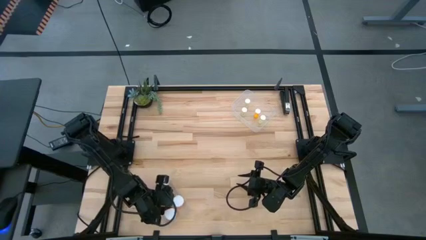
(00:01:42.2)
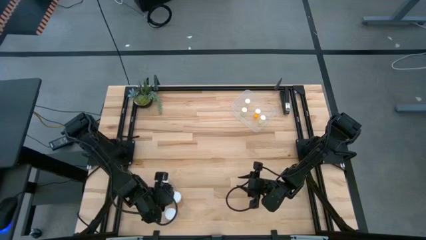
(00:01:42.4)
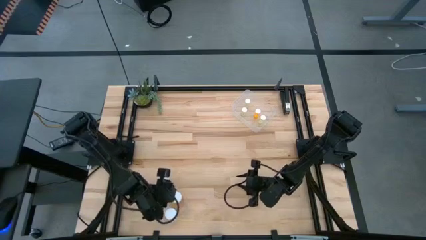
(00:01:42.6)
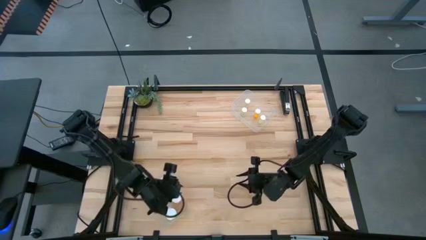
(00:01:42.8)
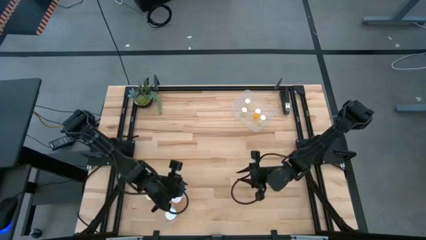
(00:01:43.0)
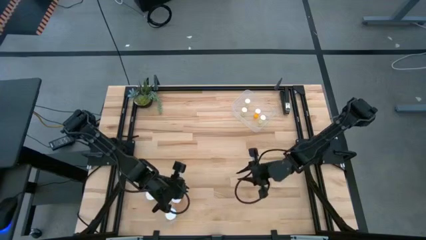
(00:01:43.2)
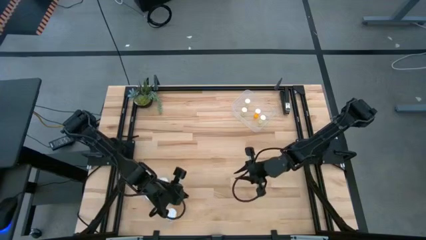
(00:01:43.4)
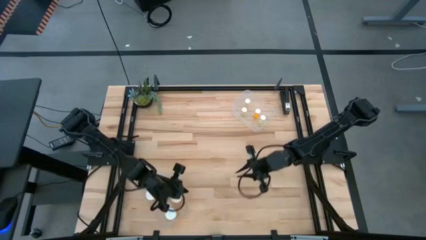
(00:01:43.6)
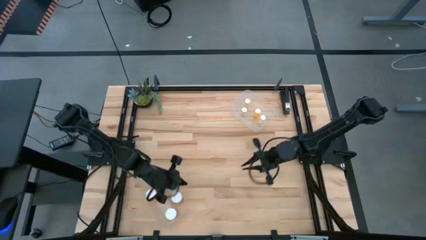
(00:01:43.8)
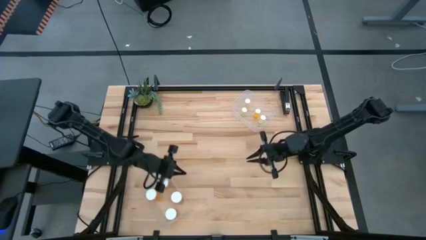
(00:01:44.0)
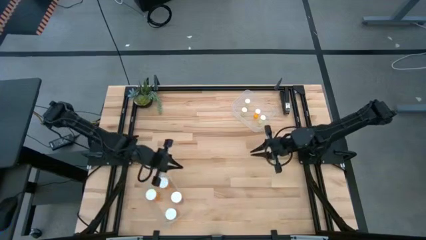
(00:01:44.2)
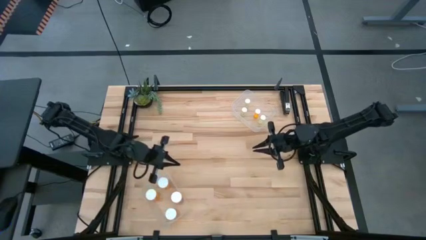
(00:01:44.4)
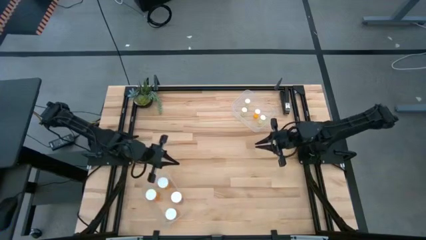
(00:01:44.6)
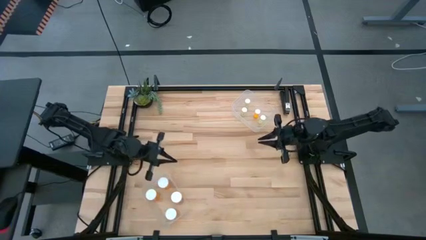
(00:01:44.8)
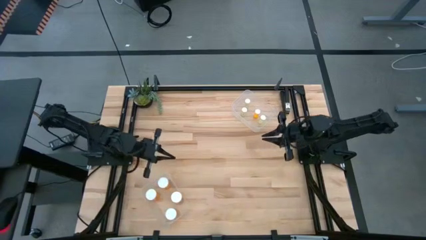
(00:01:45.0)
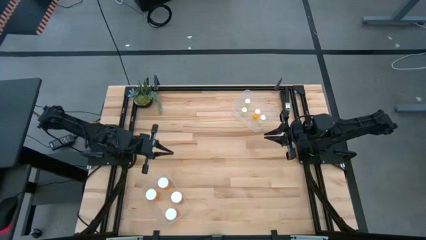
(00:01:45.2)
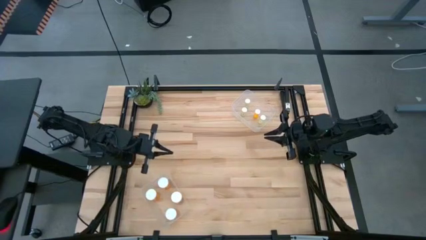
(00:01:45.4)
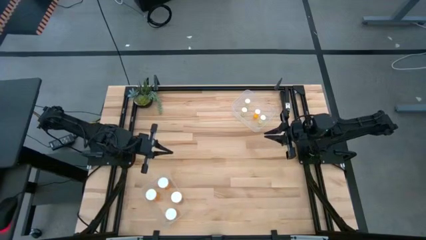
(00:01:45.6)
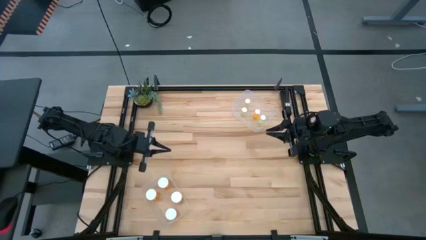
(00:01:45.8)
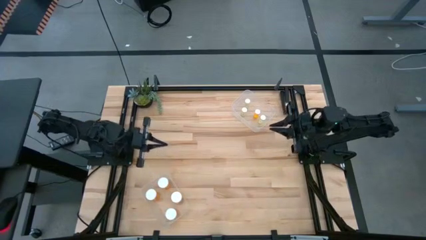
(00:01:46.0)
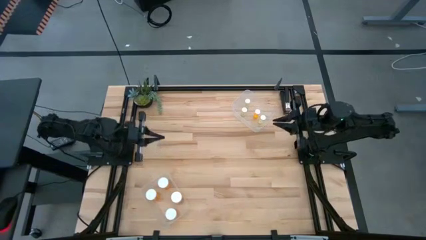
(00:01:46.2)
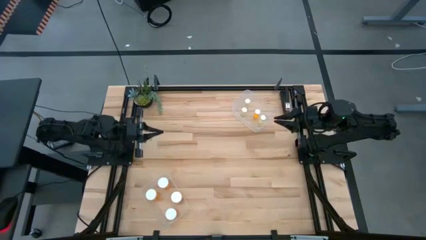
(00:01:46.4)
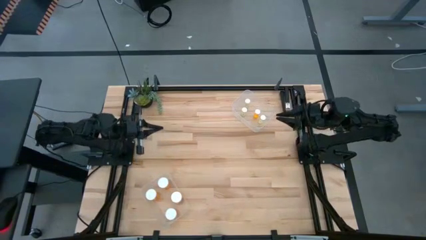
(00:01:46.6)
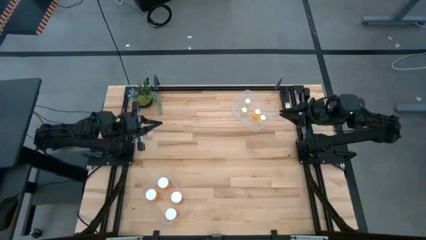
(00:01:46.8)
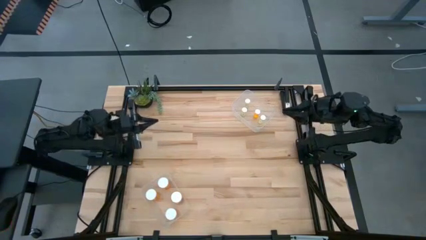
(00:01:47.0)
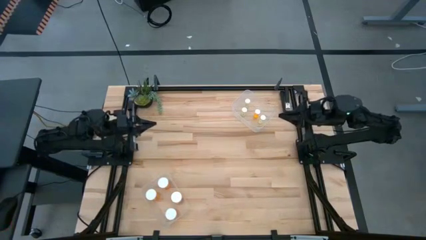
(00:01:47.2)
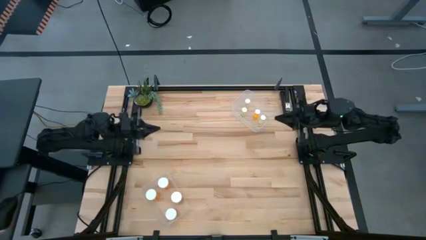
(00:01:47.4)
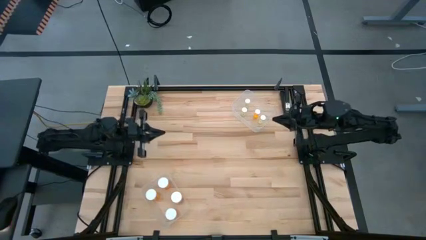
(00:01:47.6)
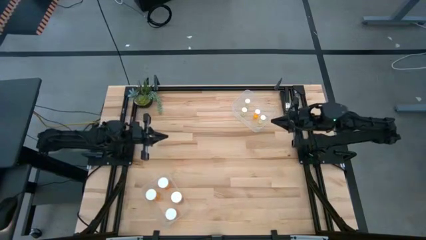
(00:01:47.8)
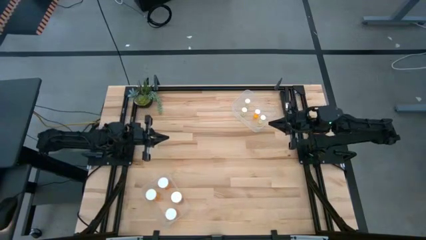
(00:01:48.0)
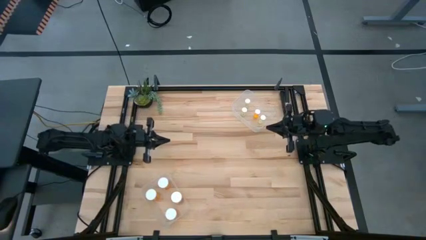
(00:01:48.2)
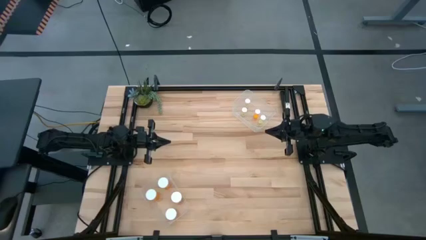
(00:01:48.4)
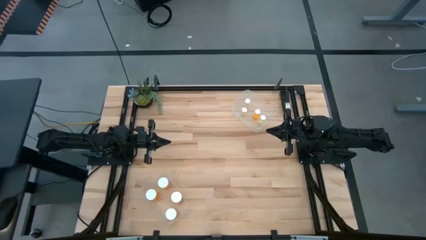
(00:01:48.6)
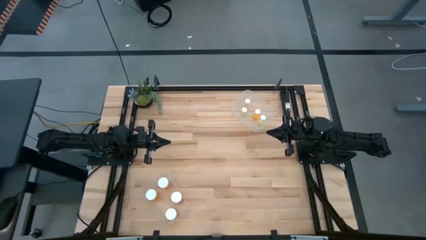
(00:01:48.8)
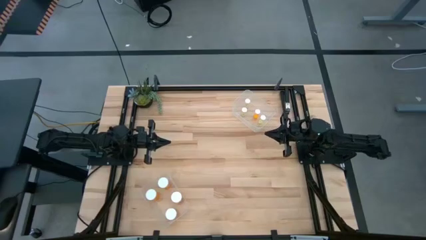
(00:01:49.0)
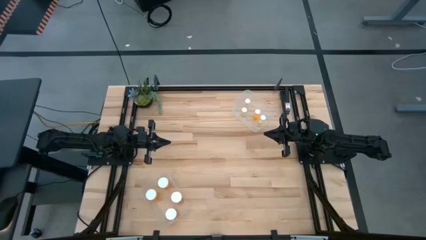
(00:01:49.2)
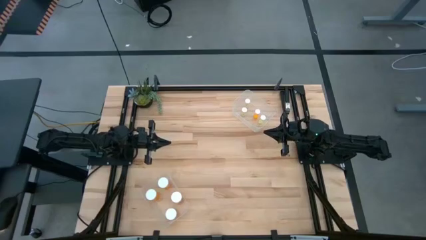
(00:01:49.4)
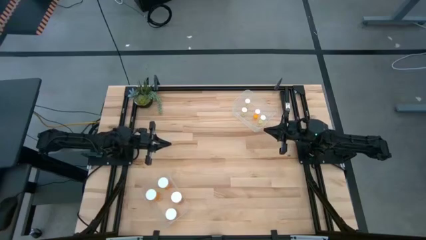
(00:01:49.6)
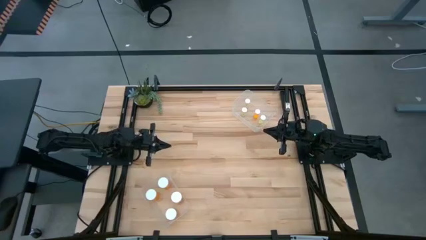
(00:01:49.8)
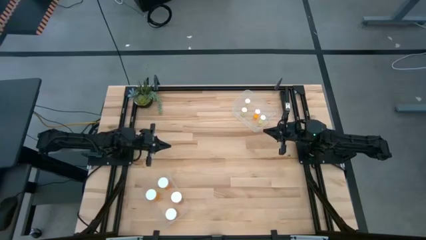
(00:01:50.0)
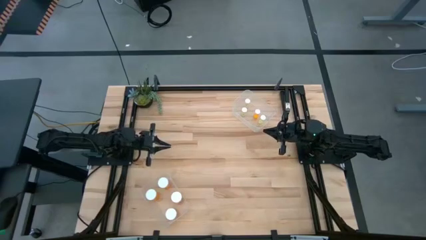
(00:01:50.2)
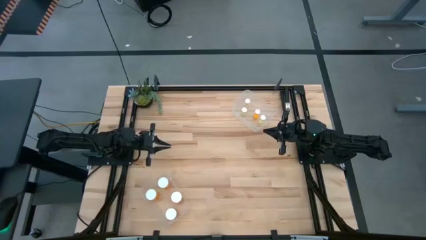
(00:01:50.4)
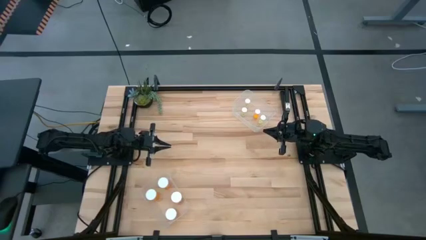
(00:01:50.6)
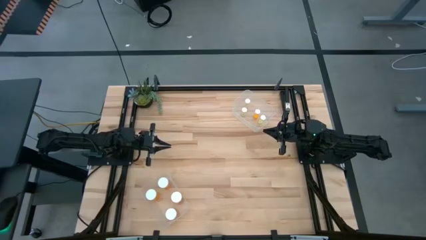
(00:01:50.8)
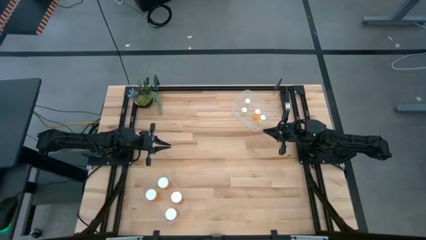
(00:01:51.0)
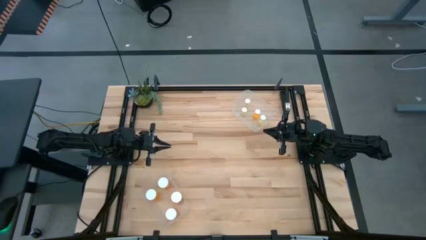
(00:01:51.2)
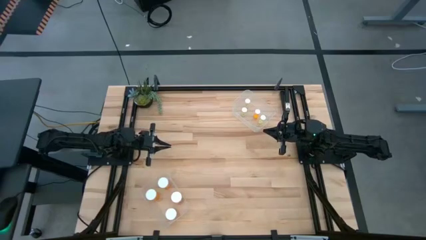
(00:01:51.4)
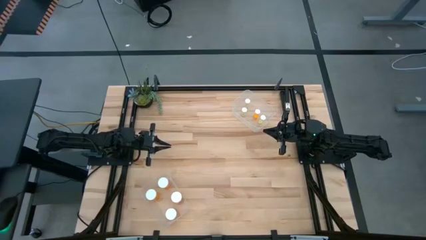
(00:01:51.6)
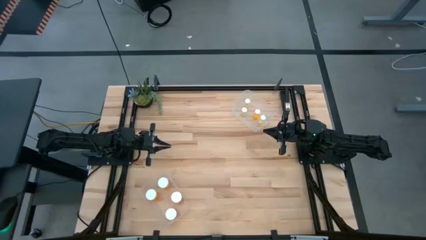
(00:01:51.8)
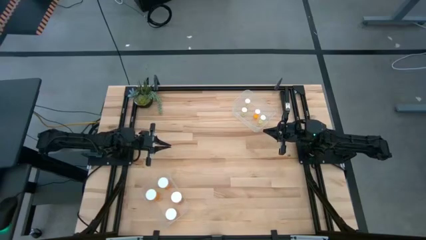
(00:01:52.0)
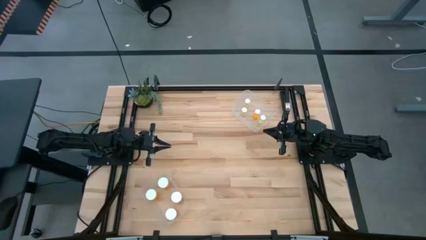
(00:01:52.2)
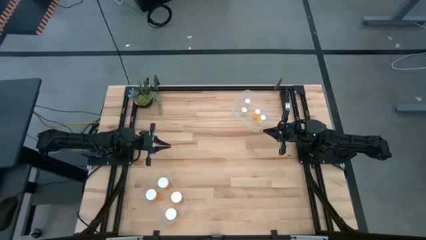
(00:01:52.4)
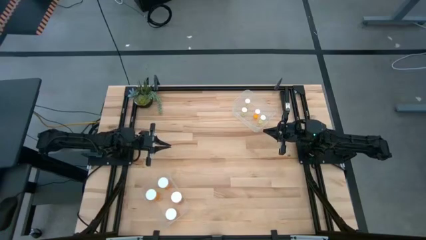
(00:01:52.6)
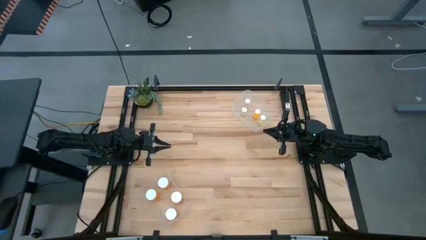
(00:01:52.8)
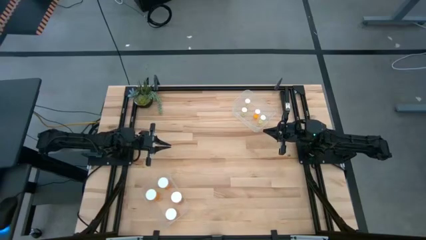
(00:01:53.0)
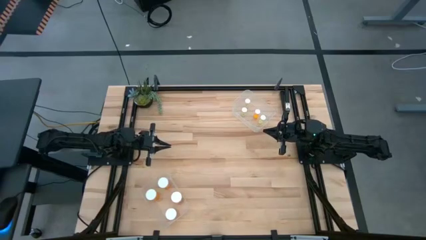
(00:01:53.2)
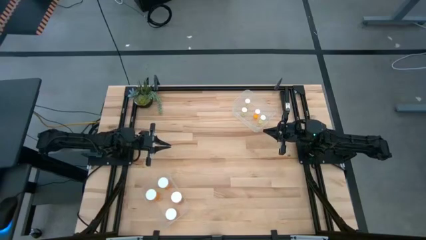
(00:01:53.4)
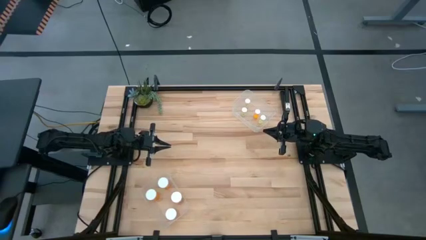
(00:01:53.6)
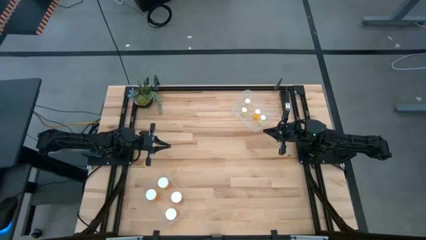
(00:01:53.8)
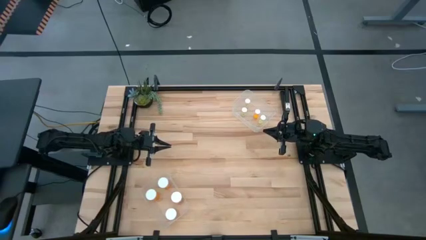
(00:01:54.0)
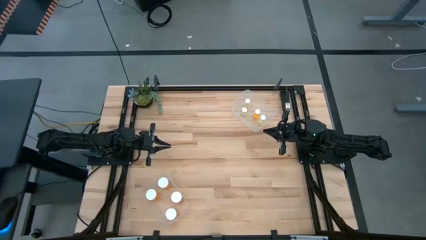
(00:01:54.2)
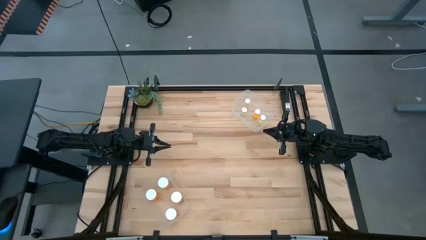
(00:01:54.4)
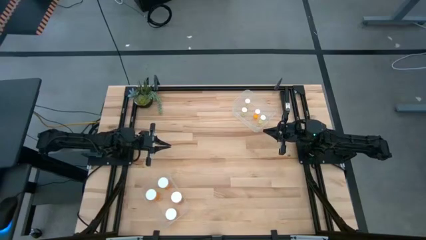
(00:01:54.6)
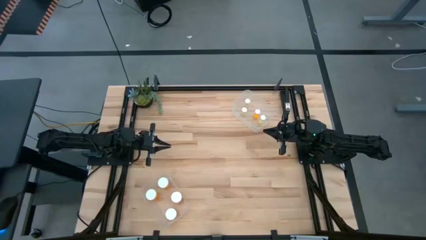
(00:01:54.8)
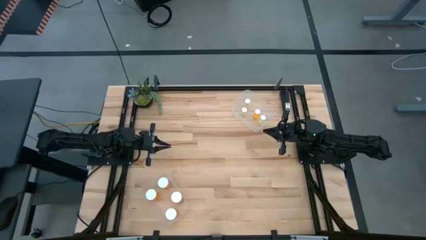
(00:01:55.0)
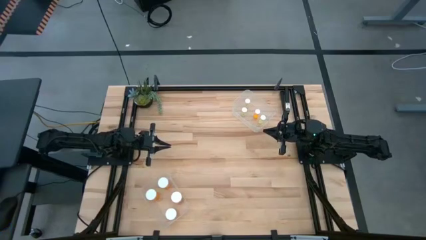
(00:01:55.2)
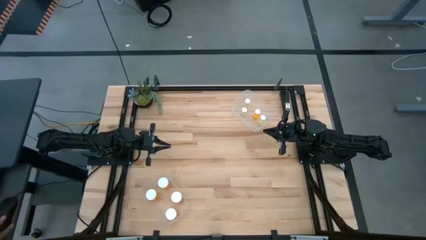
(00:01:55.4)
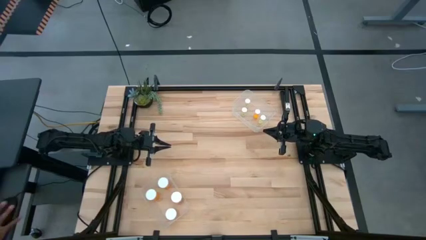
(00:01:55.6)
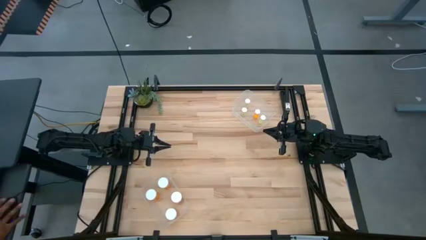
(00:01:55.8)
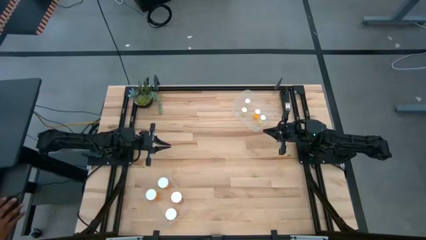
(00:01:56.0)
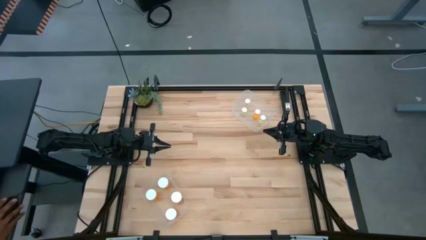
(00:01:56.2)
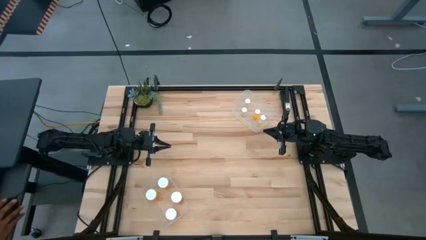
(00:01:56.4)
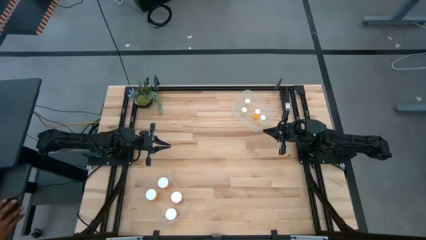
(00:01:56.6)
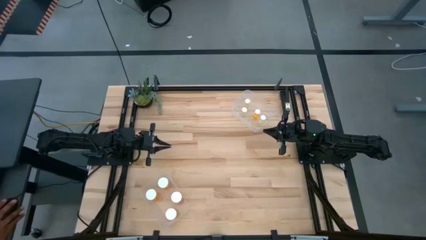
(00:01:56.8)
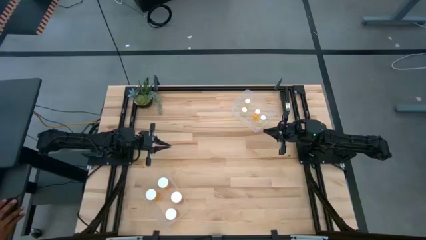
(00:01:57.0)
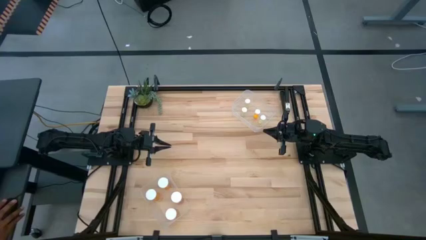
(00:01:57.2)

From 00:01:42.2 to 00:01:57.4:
Task: Pick and place medicine bottles into bin by pill shape (circle, oval)
Return to Home Position
